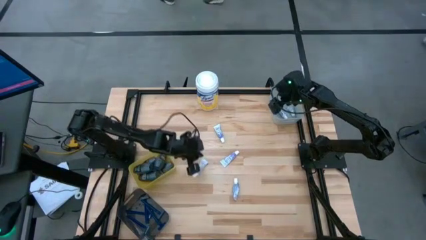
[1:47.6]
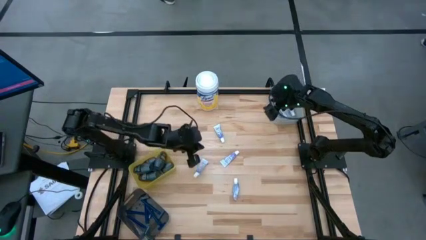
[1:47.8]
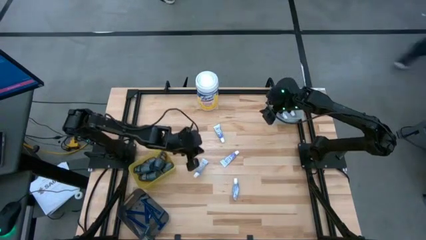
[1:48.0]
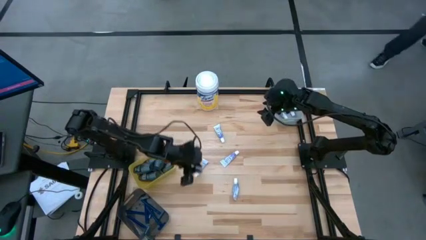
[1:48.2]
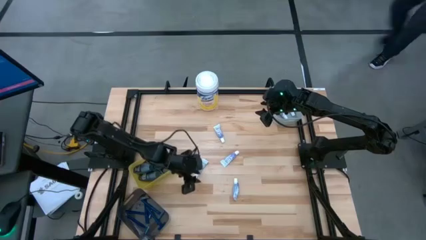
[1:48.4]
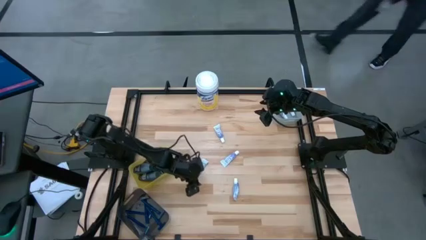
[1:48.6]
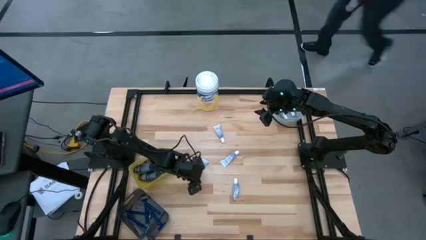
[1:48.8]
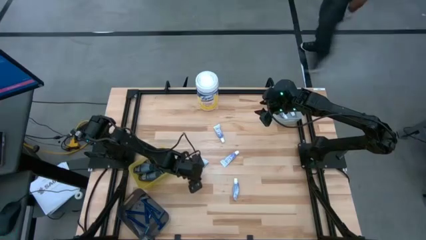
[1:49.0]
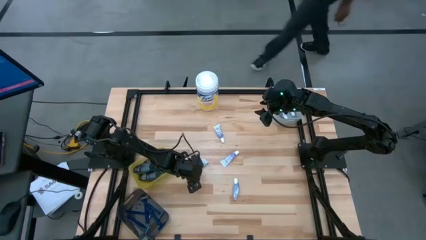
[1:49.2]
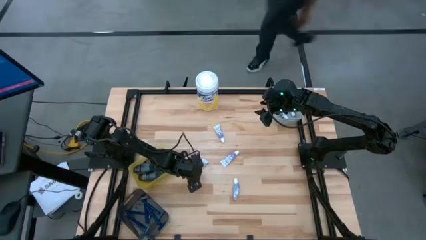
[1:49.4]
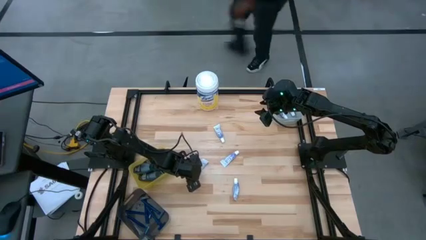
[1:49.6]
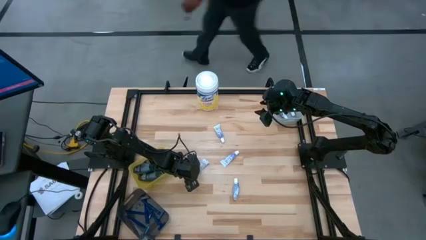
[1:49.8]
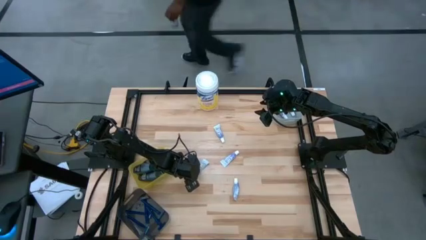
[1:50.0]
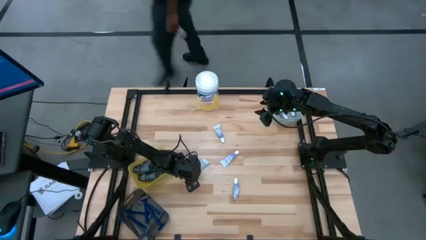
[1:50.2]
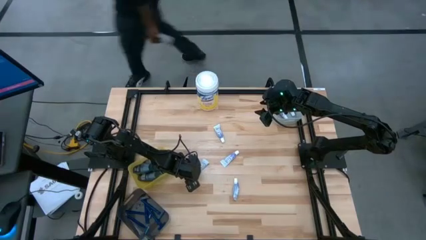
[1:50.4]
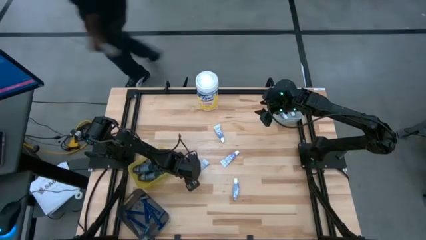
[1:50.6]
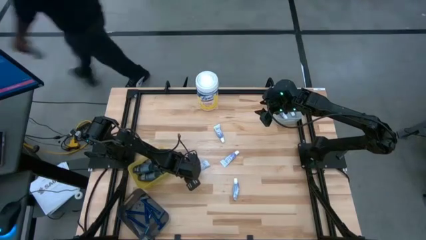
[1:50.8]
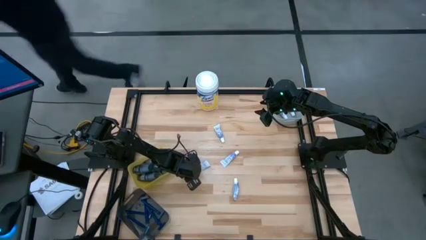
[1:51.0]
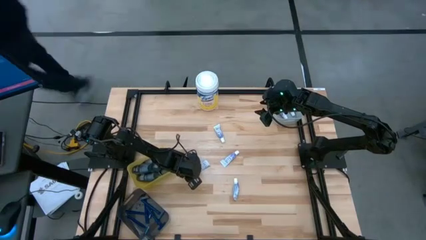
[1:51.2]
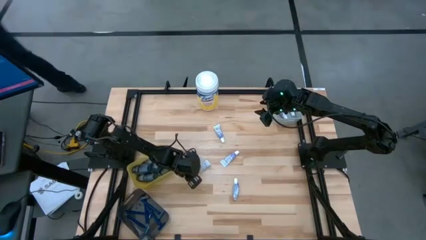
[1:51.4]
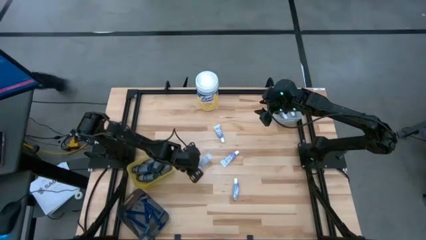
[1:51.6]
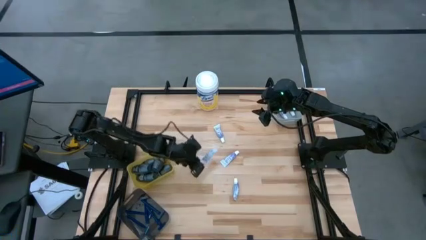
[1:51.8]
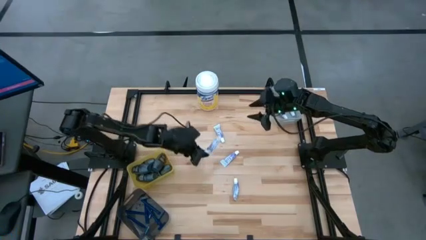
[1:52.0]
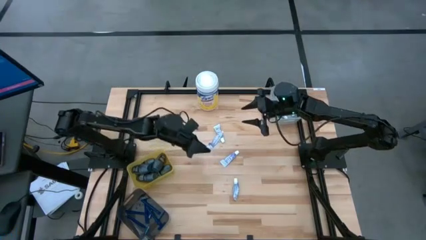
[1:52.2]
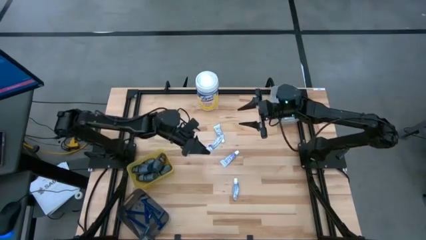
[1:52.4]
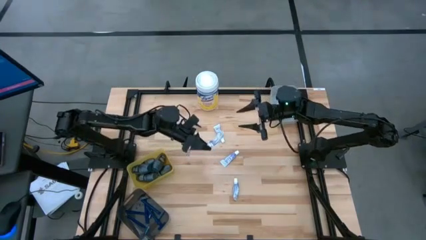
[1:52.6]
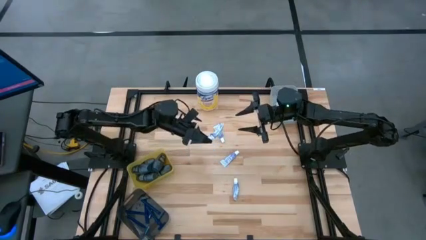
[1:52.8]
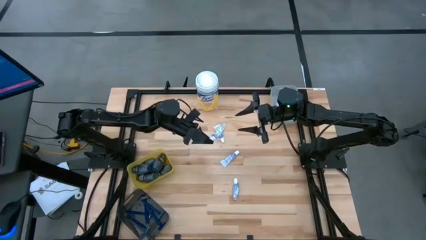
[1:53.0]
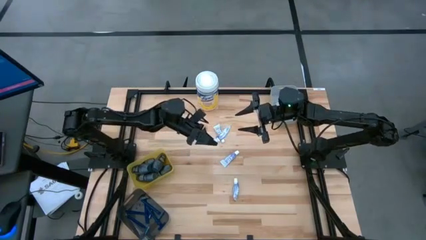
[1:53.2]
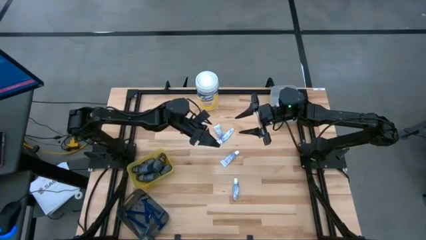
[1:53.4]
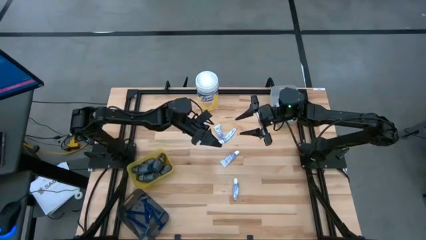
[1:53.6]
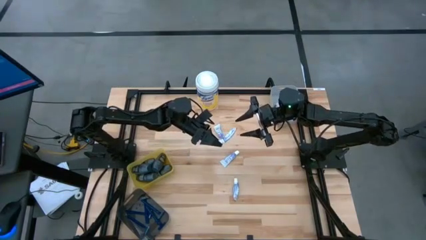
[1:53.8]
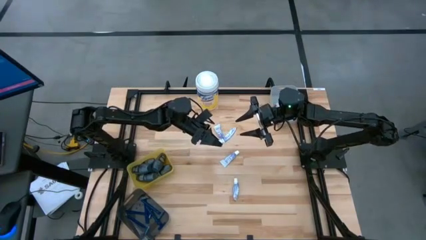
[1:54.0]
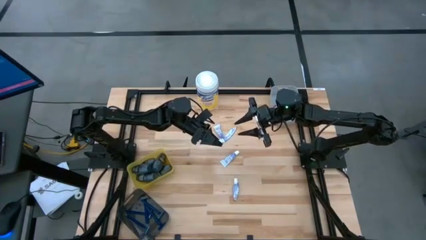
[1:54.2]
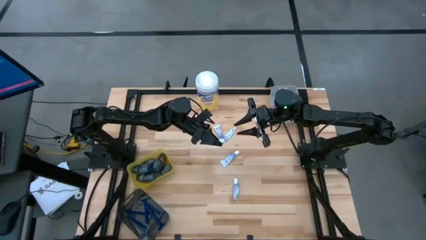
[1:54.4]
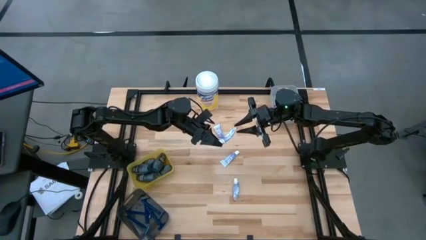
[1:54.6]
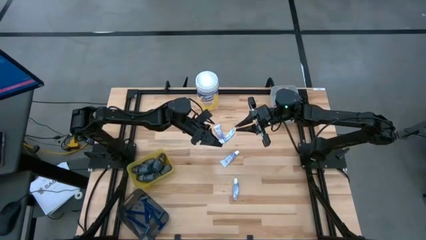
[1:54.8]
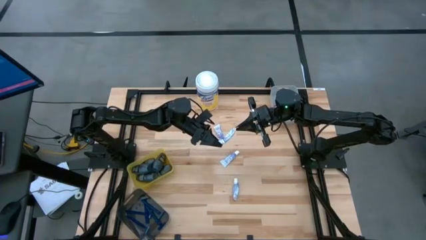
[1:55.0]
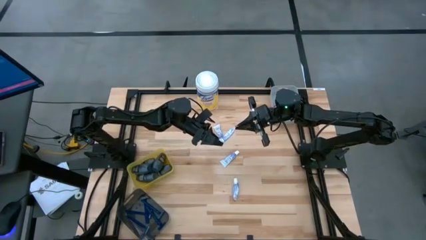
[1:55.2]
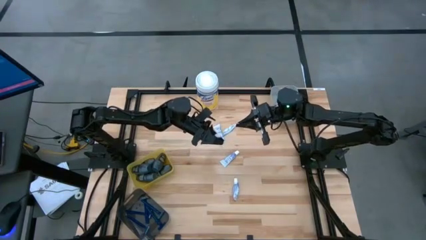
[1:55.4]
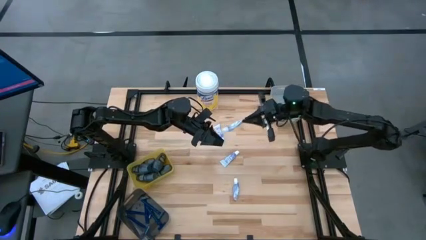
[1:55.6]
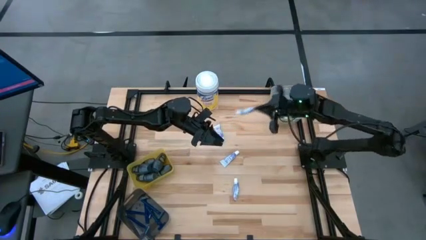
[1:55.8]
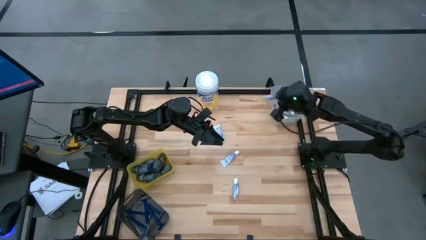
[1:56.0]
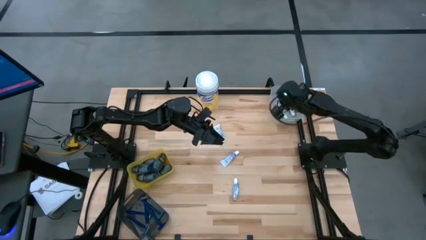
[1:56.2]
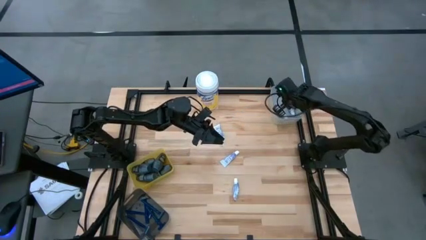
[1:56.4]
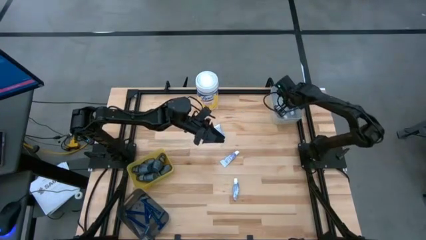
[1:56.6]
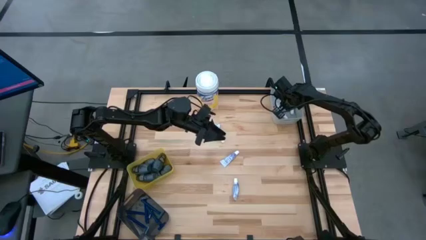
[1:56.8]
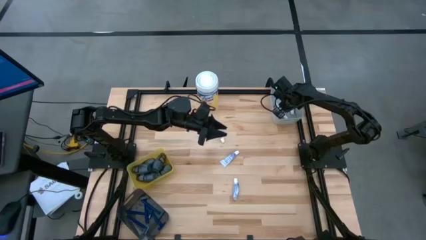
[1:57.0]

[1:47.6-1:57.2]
Task: Pick & Place Travel size toiletries
Put the white toothpaste into the gray bin

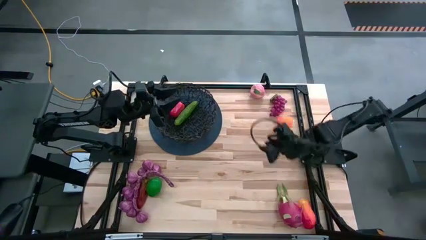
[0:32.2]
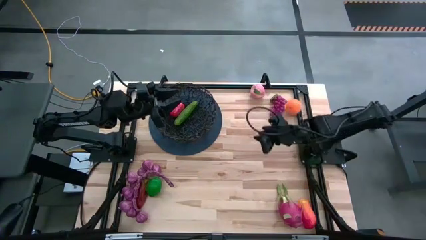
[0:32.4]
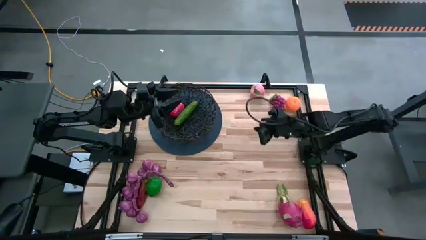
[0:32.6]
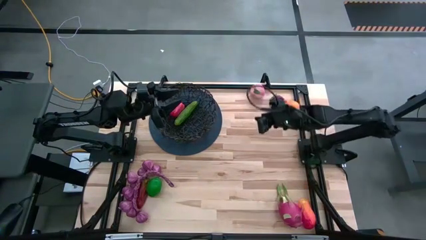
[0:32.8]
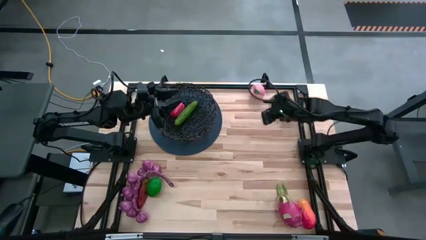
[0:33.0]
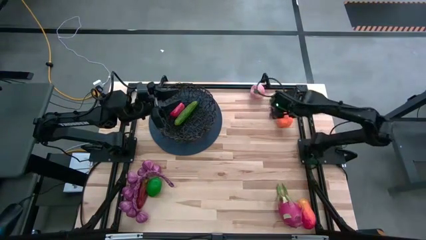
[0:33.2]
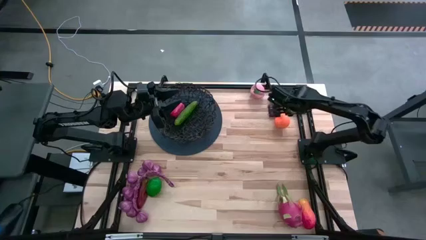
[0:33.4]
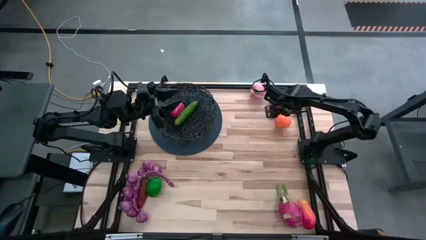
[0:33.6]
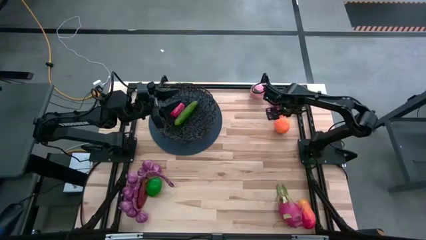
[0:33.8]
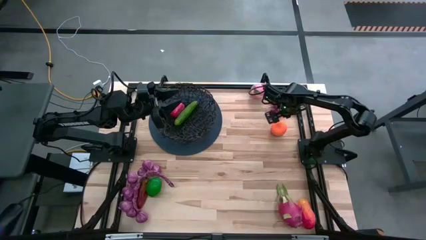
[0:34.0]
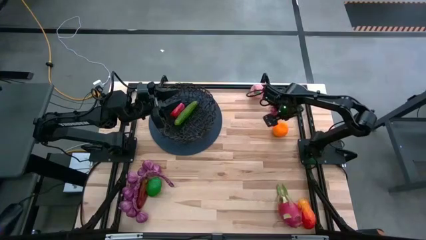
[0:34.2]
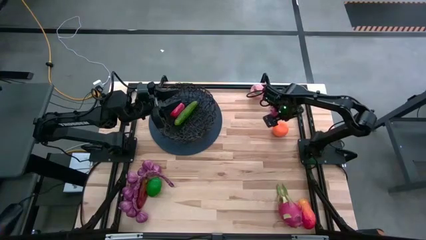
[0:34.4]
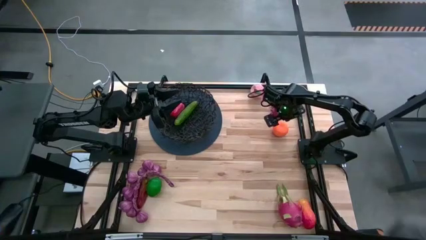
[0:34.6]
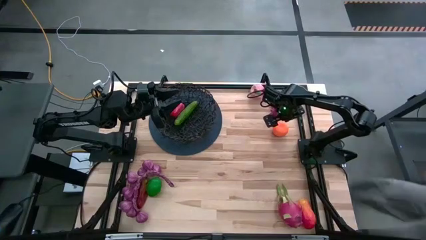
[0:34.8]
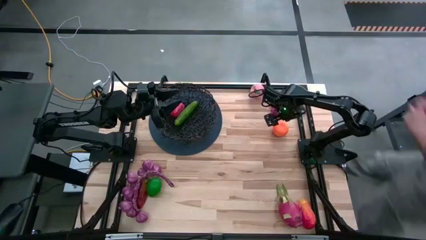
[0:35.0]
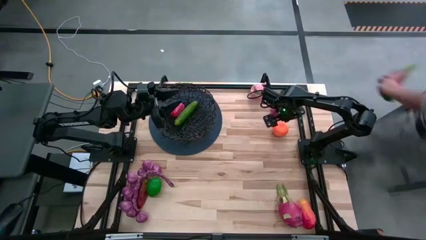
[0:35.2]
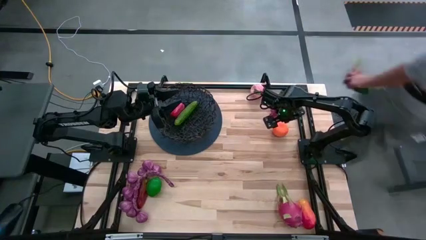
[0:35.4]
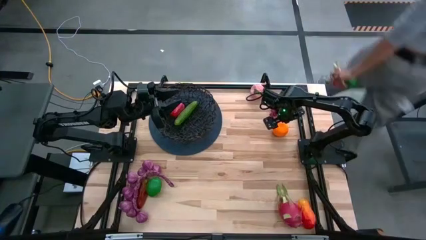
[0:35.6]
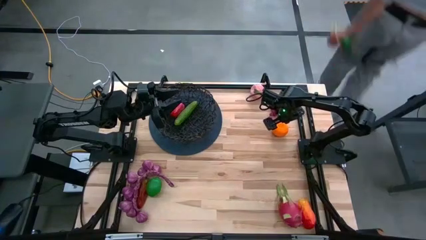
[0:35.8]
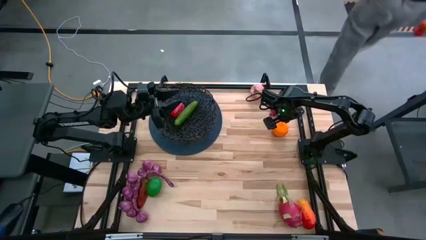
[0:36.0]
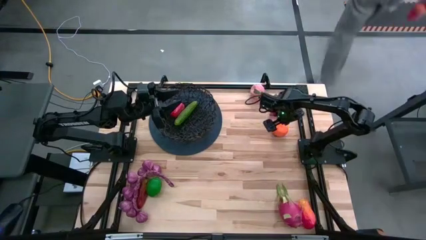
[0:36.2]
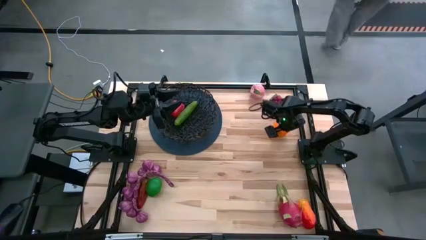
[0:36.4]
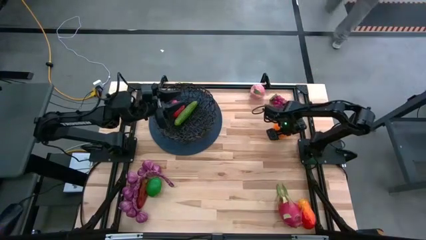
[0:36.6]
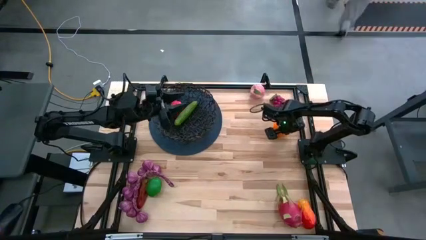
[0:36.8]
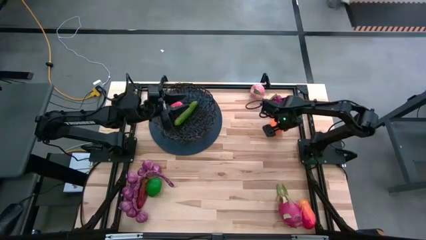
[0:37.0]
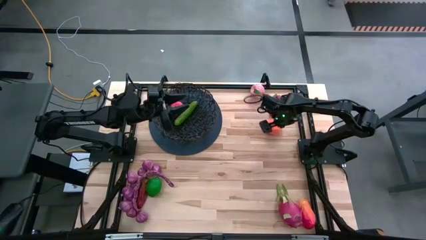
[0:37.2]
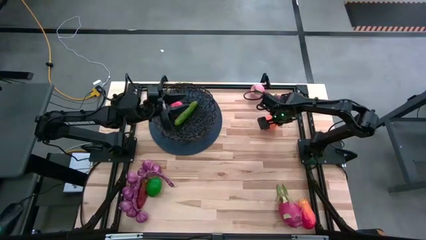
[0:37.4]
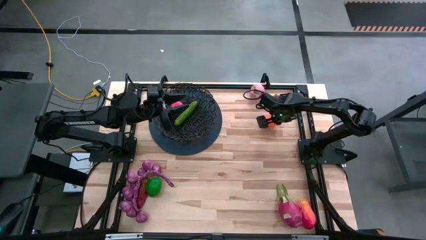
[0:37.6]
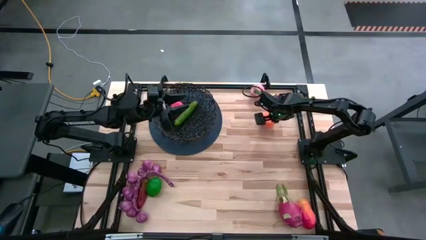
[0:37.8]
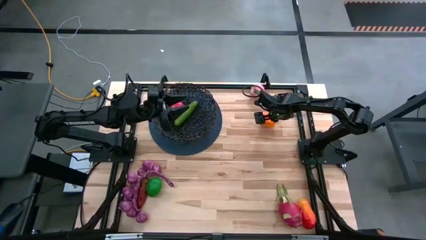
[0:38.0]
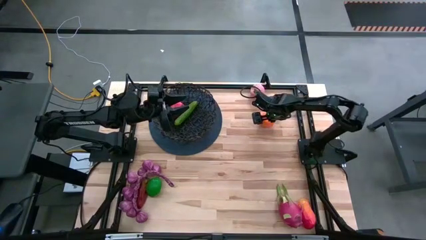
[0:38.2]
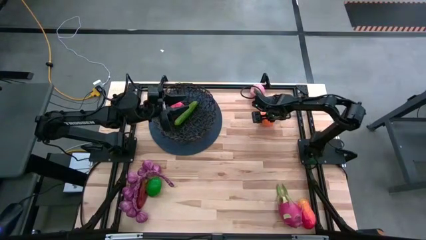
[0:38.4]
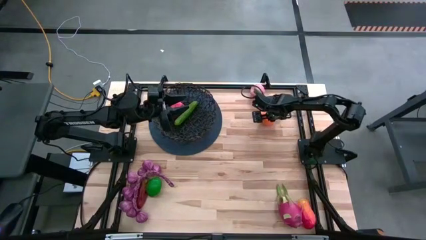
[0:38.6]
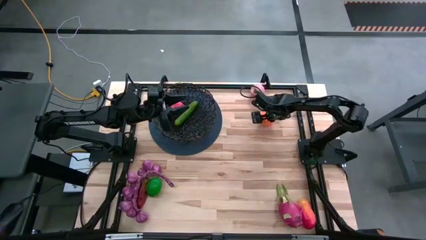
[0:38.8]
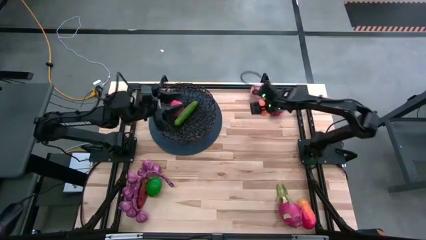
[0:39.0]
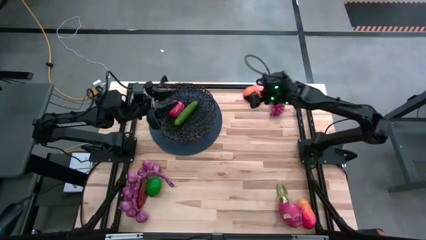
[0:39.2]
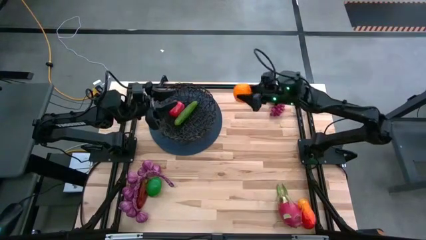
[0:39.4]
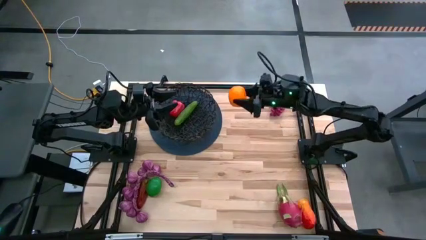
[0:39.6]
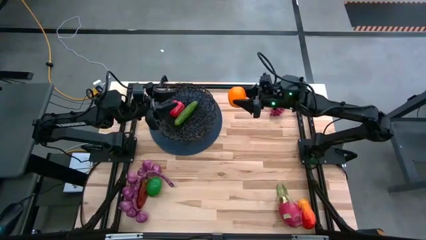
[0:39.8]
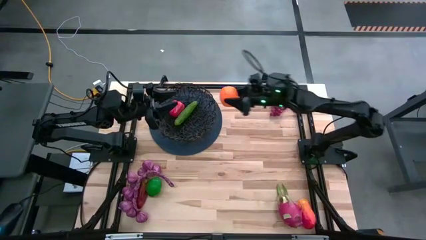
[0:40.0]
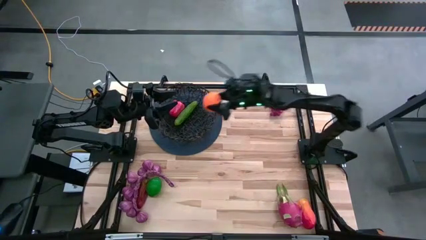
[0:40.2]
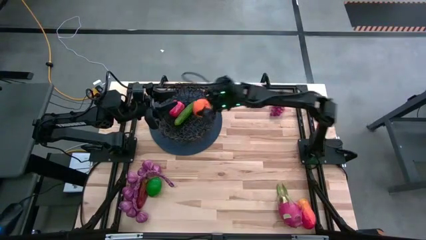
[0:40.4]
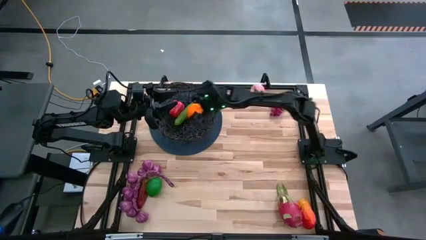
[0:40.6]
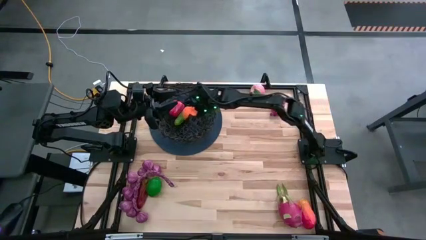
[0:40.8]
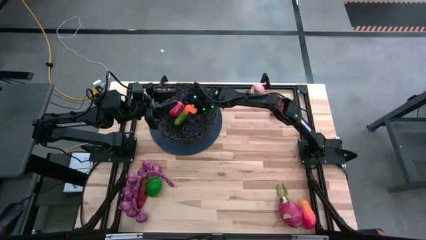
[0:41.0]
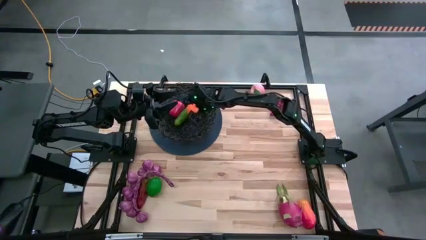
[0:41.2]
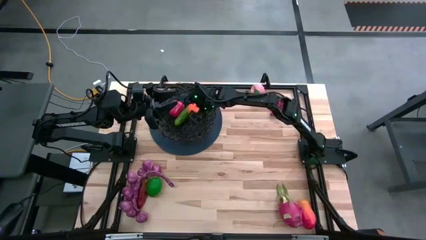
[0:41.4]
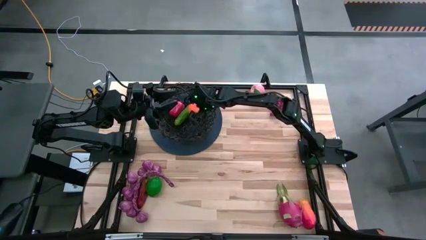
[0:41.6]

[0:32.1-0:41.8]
Task: Build produce basket
Put the orange into the black wire basket
